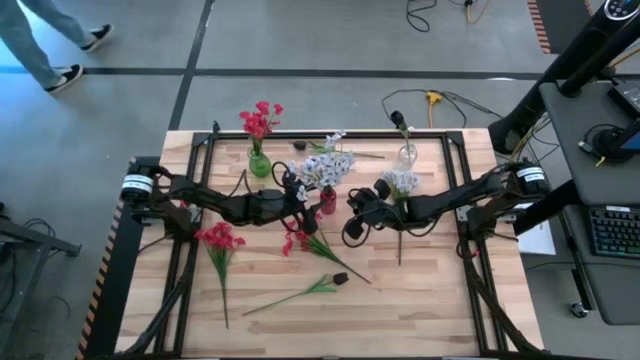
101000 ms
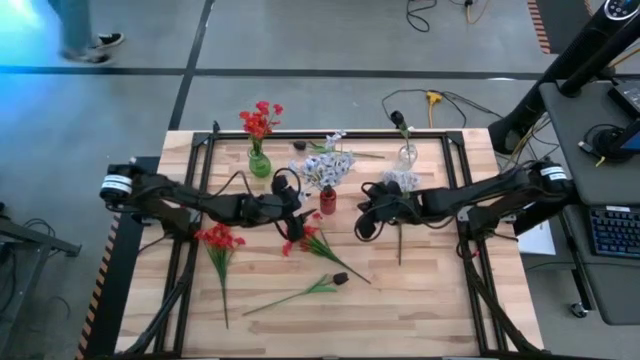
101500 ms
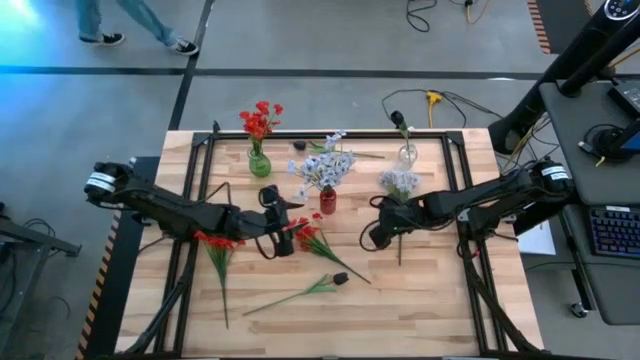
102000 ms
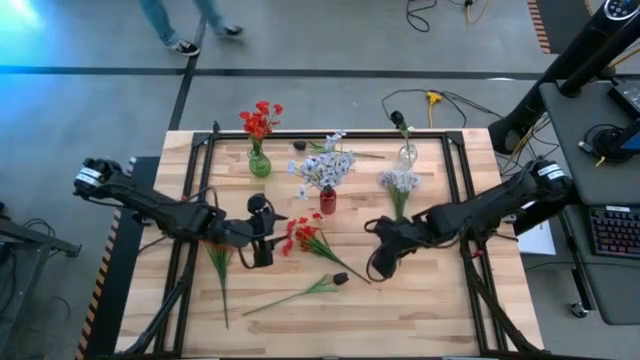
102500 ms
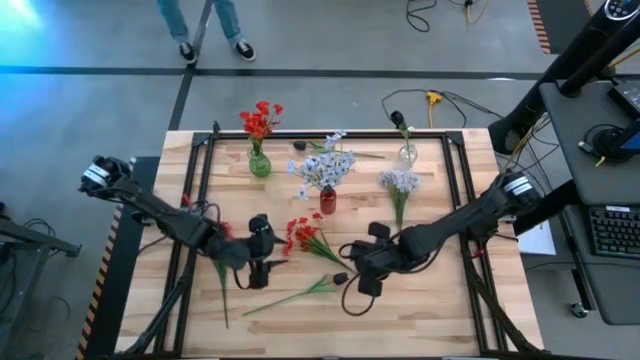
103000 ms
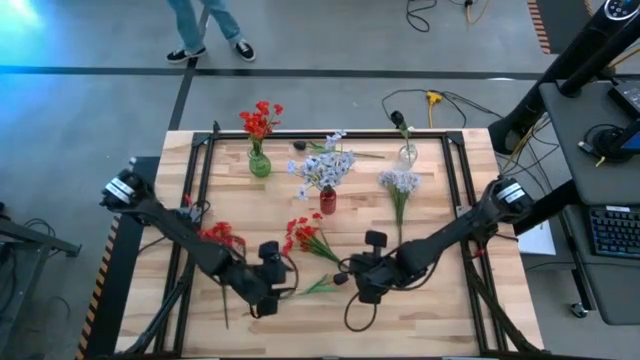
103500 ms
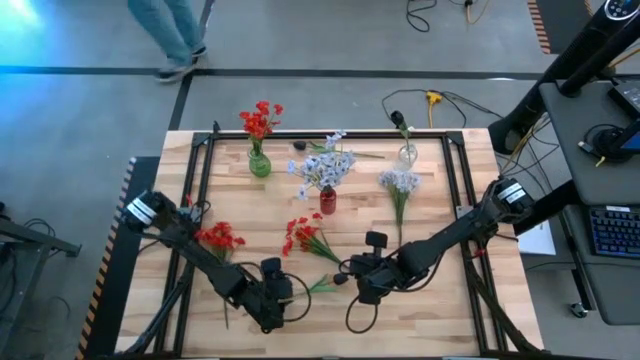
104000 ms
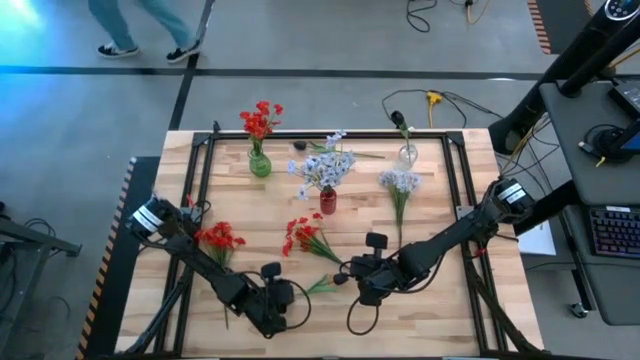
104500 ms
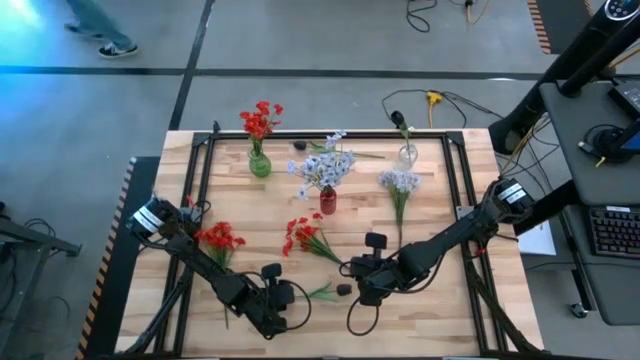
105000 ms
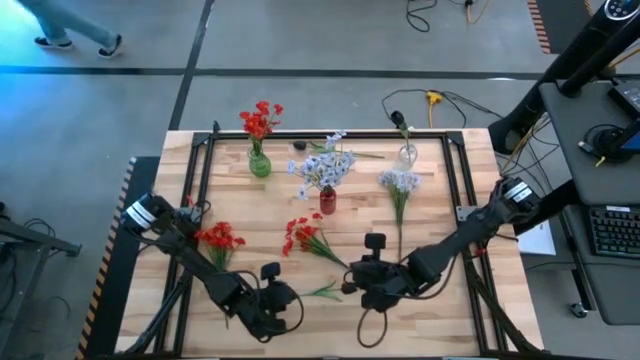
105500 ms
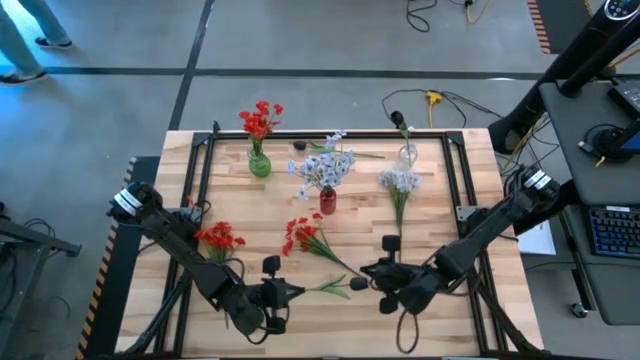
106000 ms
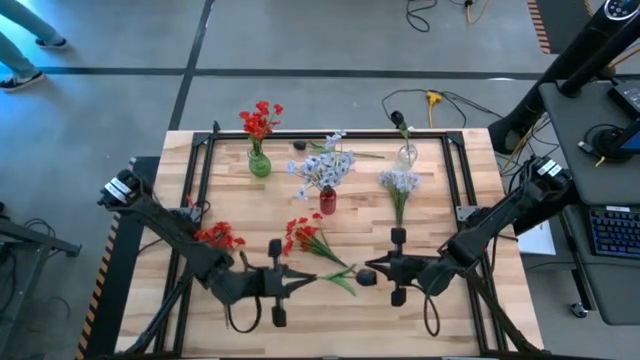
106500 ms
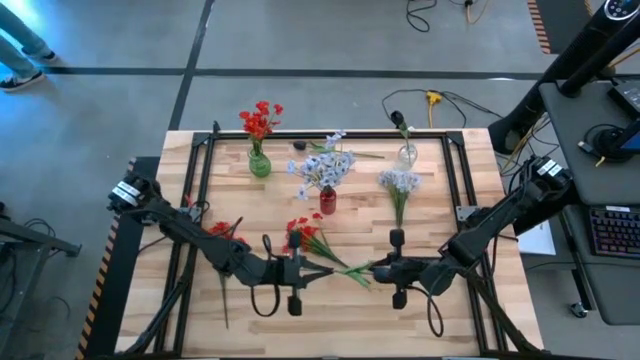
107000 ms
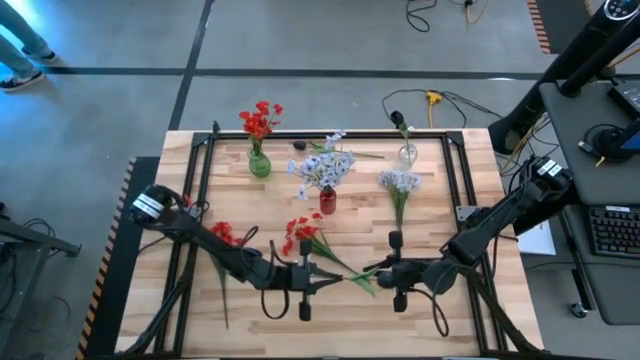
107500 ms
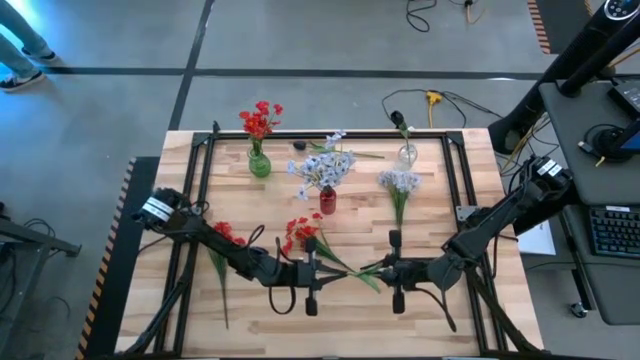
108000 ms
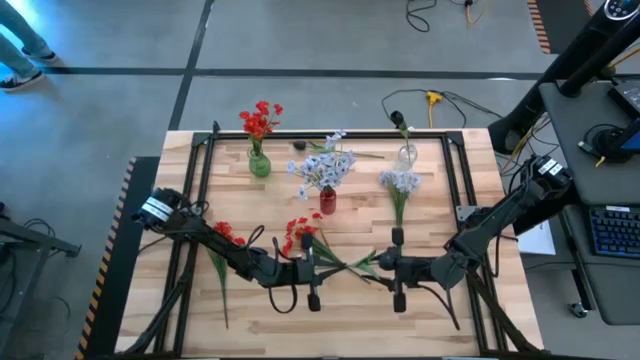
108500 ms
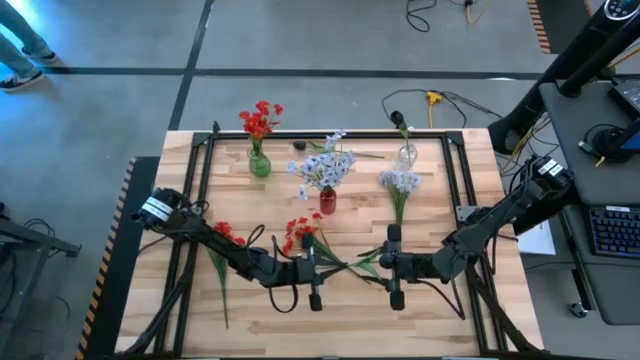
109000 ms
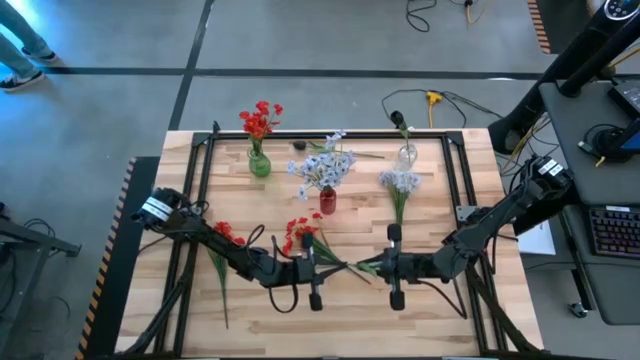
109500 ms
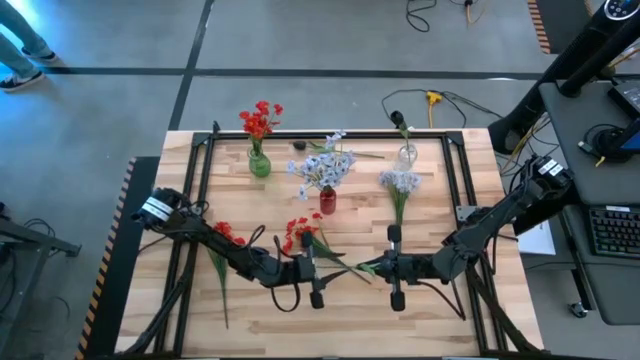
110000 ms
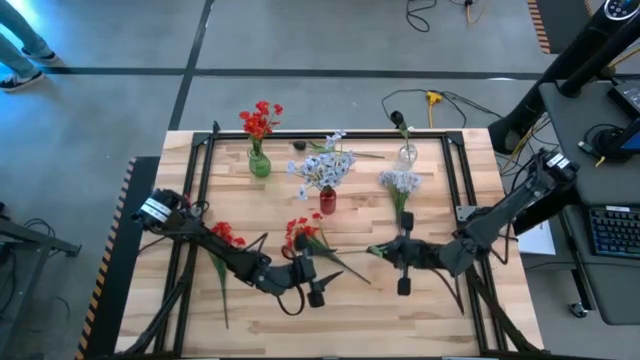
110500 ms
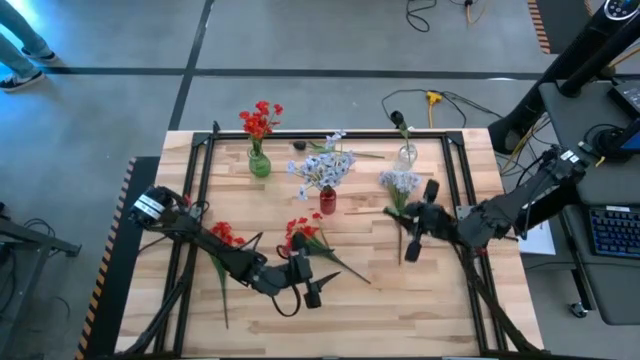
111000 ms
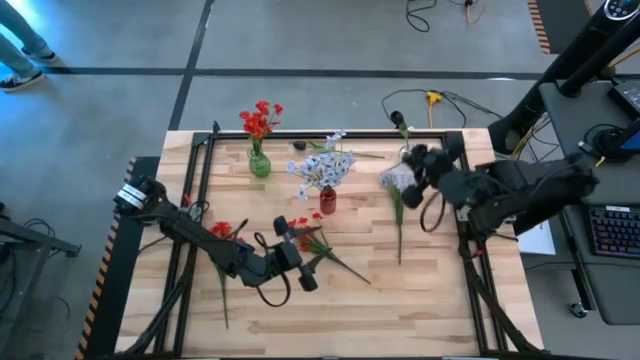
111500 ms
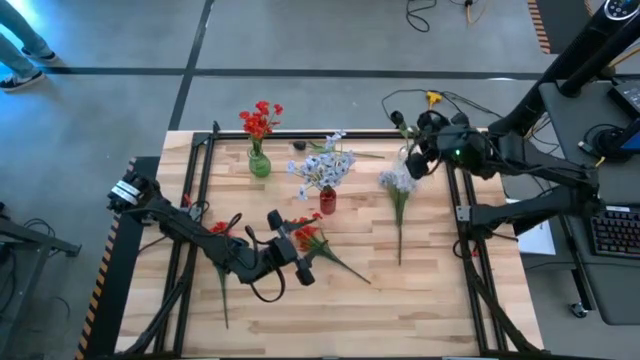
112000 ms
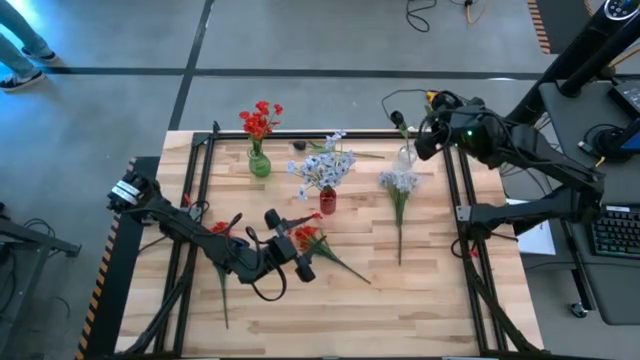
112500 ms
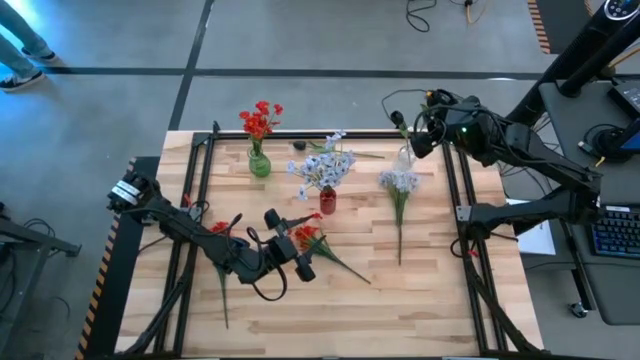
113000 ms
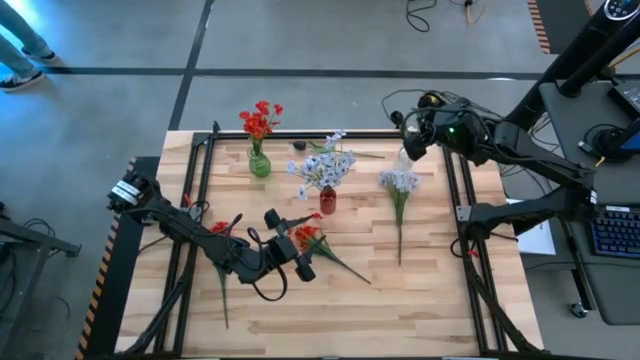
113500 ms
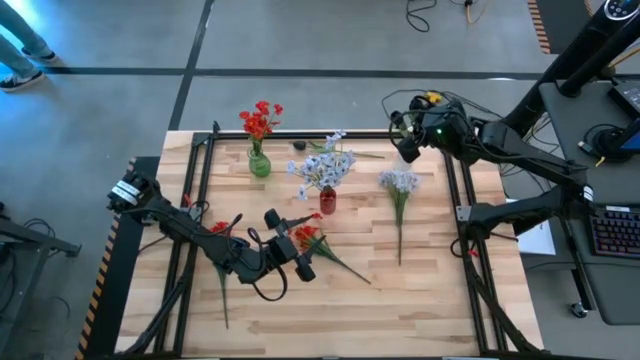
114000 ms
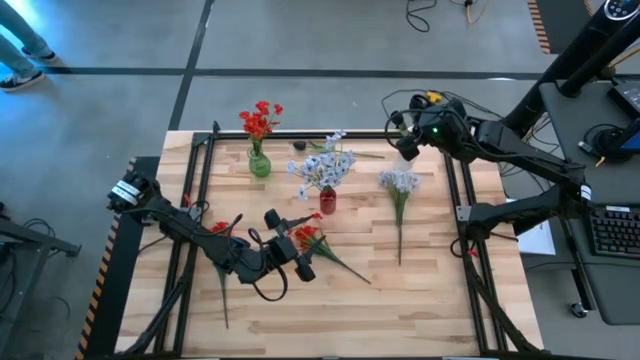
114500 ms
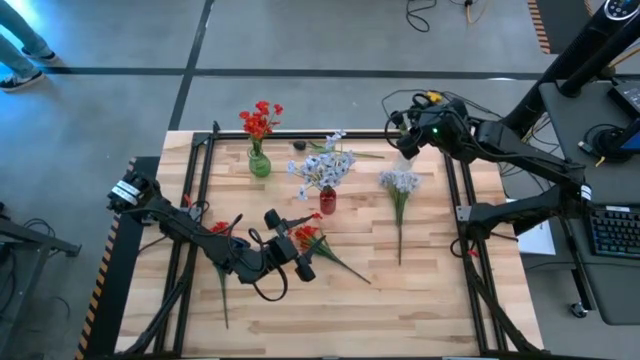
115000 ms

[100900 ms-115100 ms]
Task: Sort flowers into vase by color
Put the bottom black flower into the transparent vase

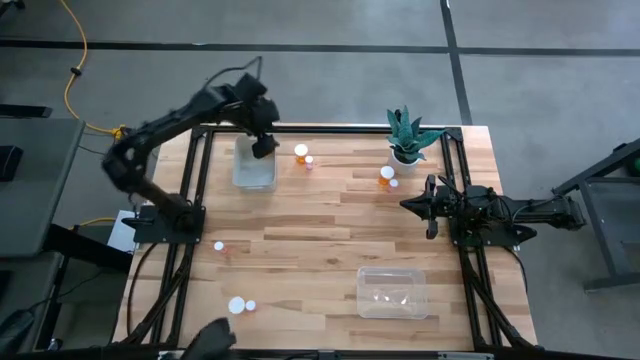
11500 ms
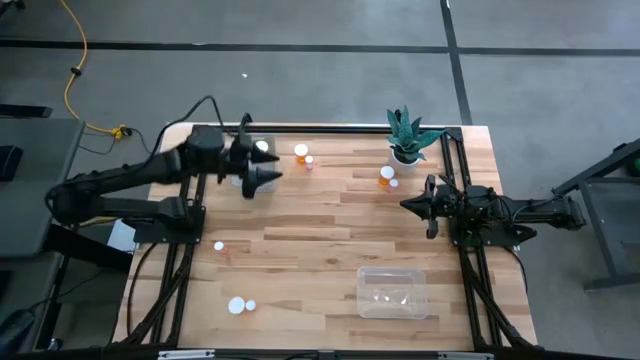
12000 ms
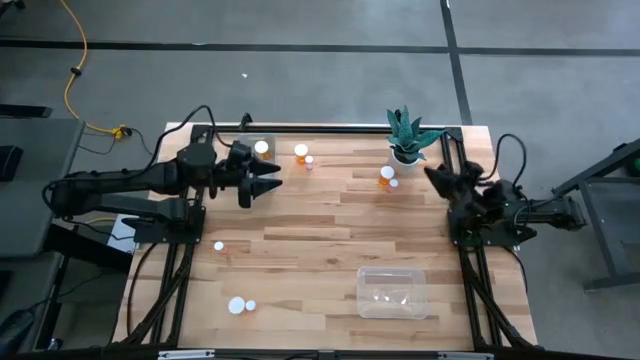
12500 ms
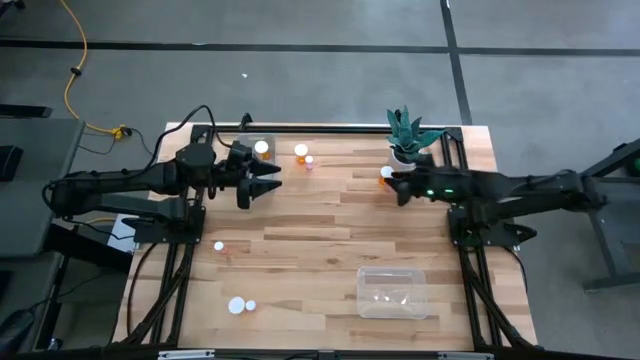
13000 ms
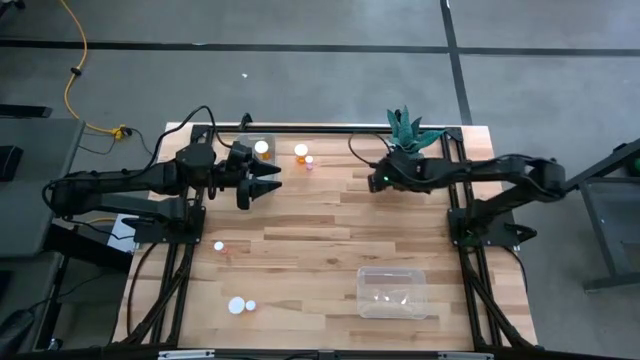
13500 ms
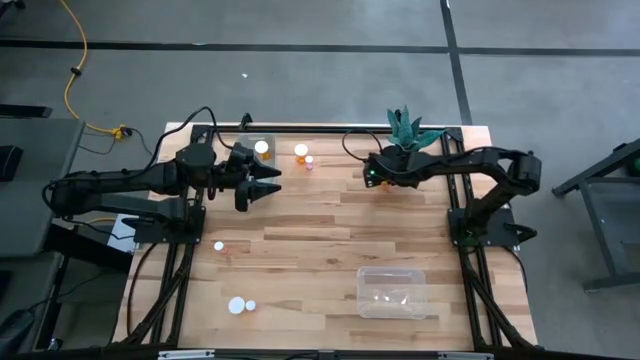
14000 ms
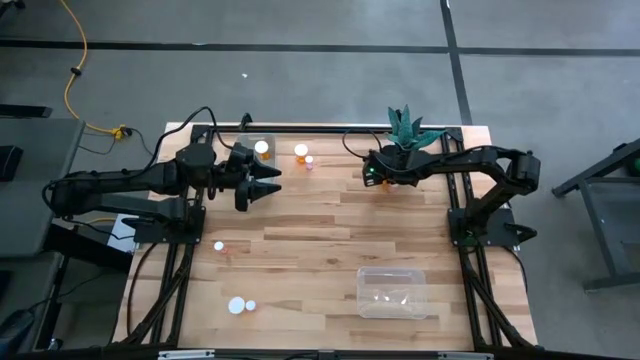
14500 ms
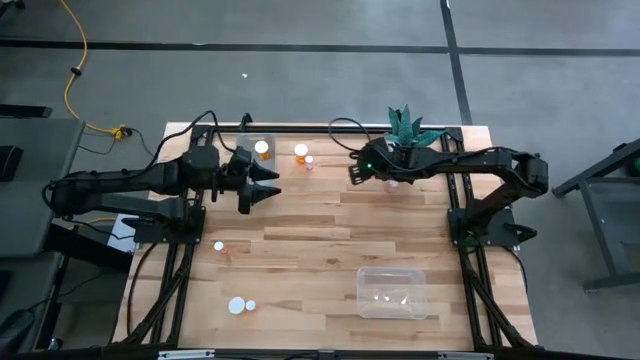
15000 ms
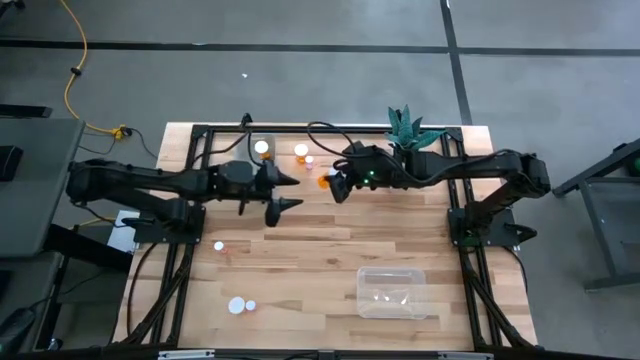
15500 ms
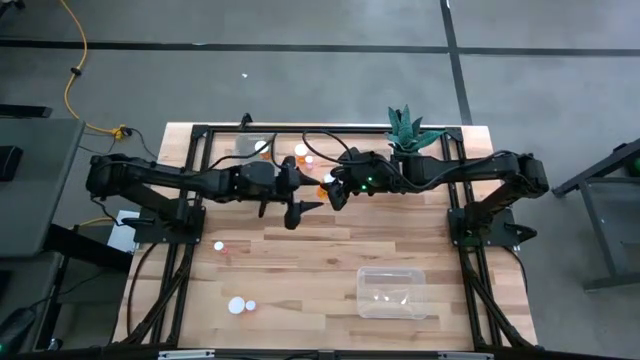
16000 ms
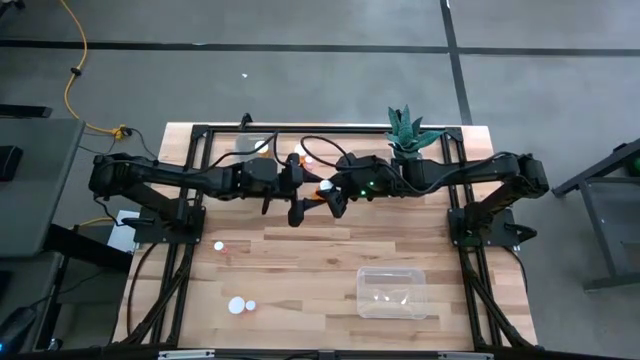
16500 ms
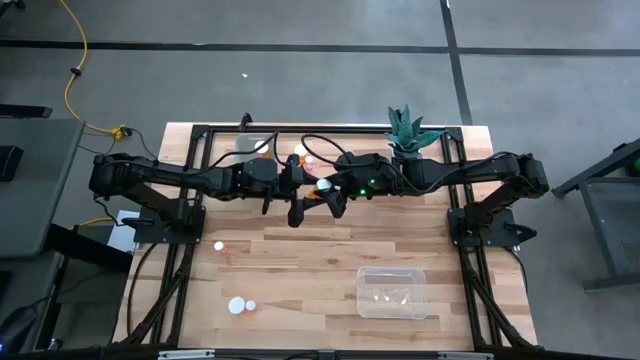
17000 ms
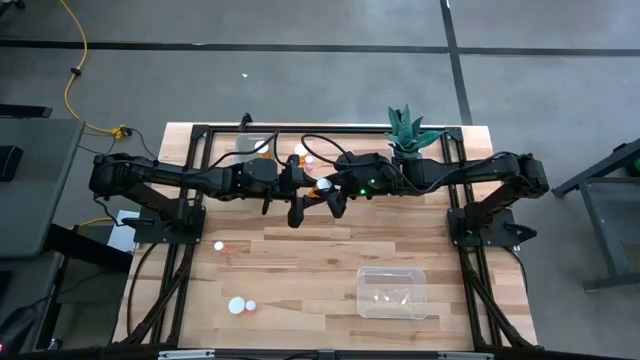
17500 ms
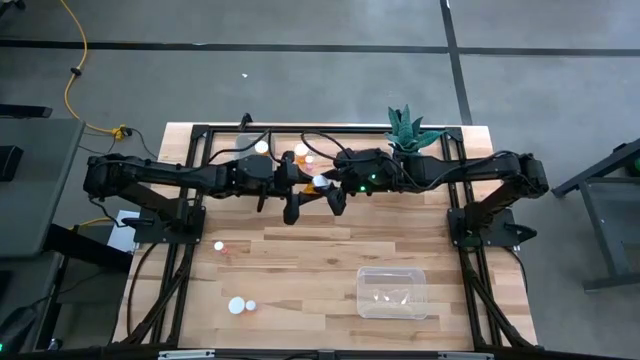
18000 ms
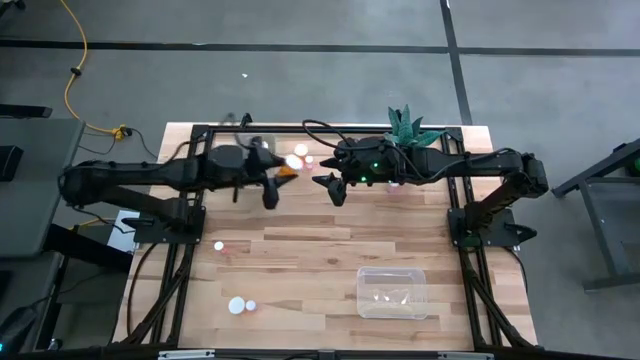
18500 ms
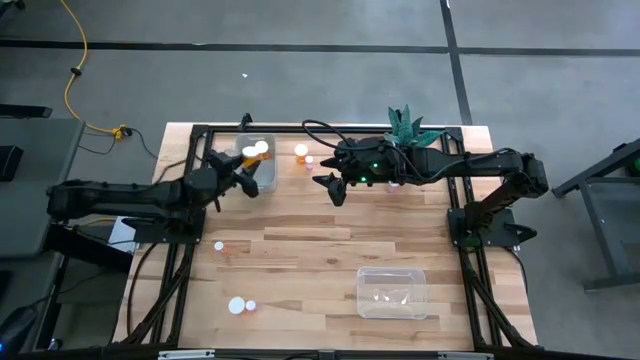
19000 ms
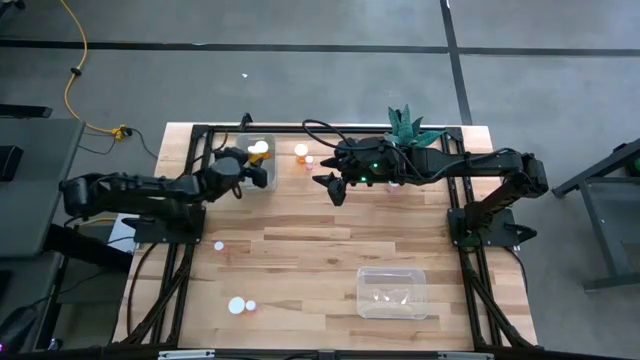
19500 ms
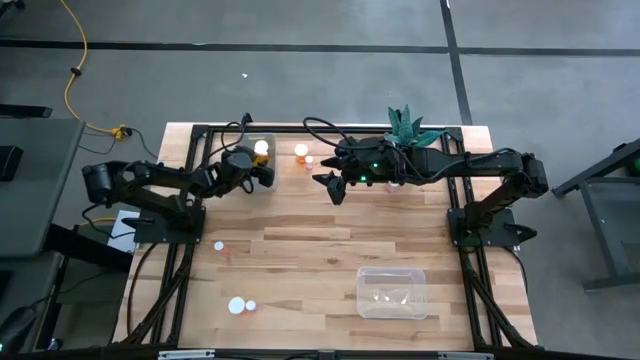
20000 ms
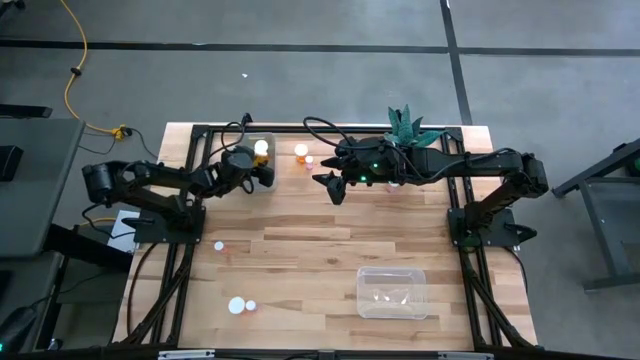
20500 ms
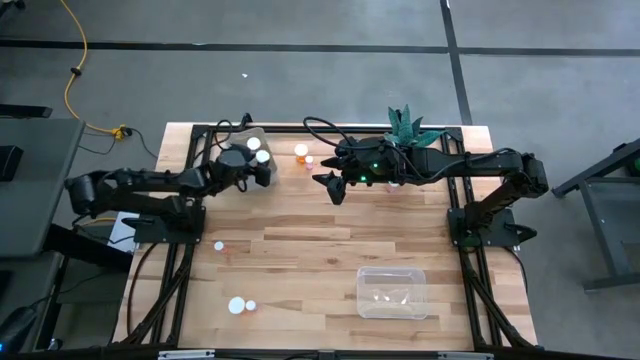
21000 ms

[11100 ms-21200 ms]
Task: Pick and place medicine bottles into bin by pill shape (circle, oval)
Put the large orange pill bottle into the gray bin
